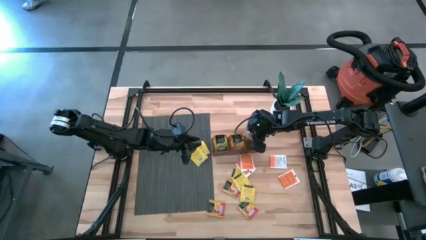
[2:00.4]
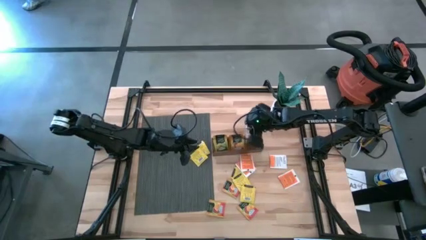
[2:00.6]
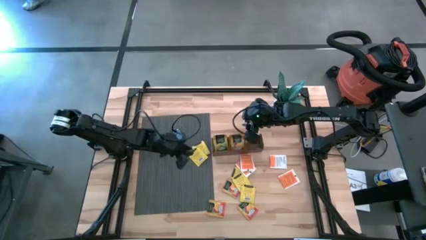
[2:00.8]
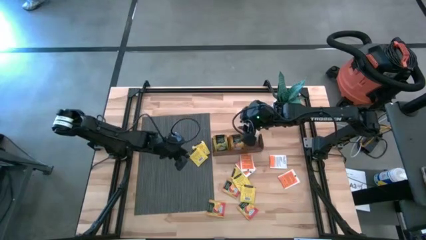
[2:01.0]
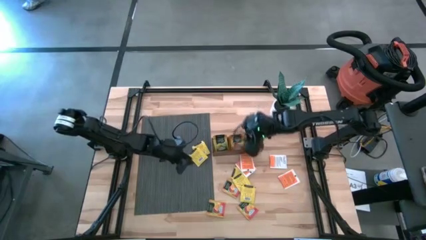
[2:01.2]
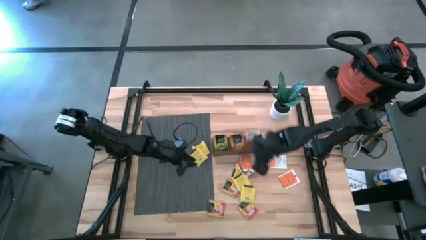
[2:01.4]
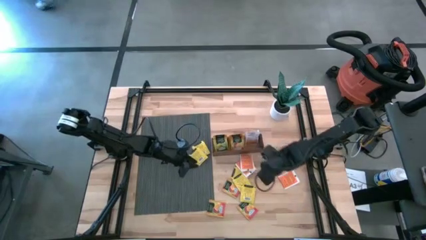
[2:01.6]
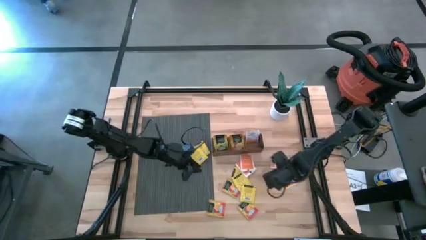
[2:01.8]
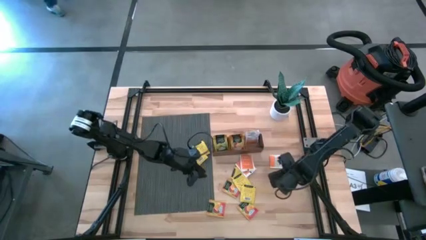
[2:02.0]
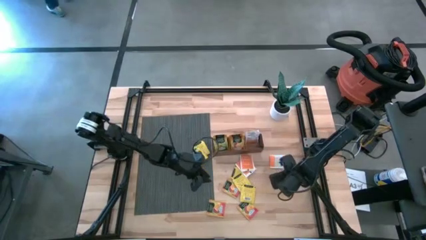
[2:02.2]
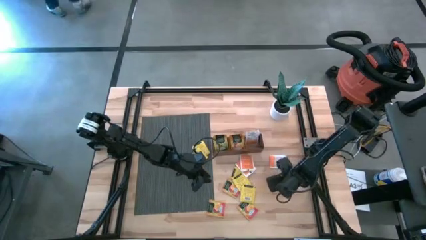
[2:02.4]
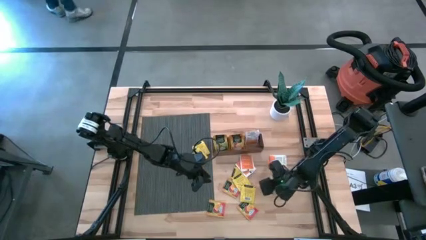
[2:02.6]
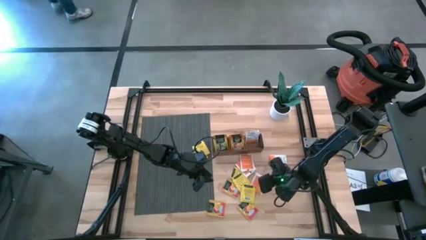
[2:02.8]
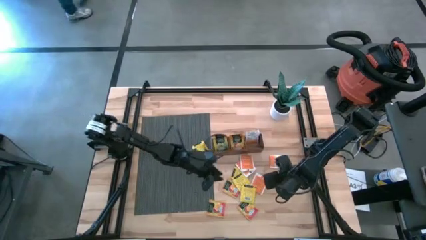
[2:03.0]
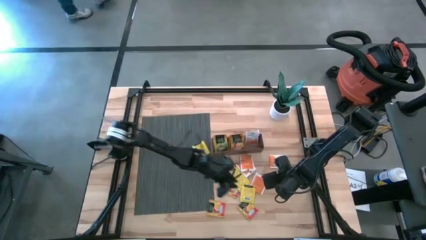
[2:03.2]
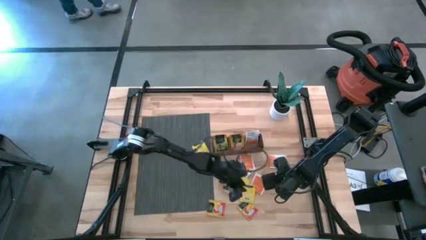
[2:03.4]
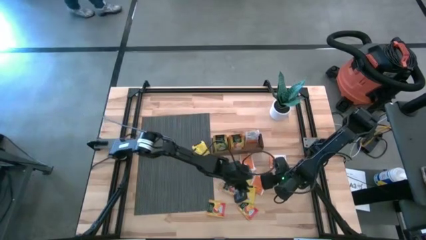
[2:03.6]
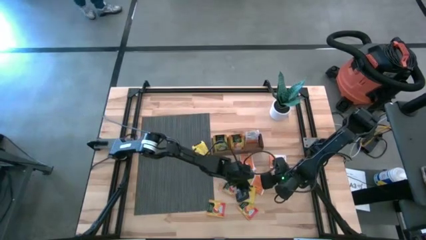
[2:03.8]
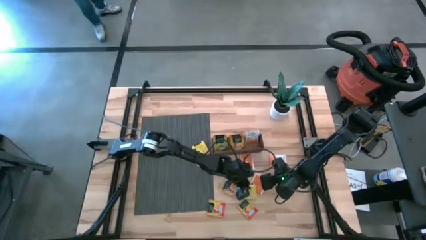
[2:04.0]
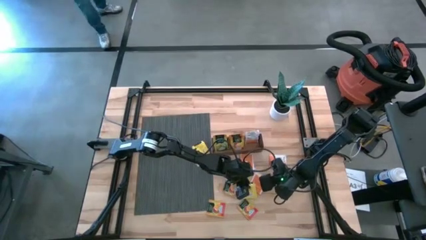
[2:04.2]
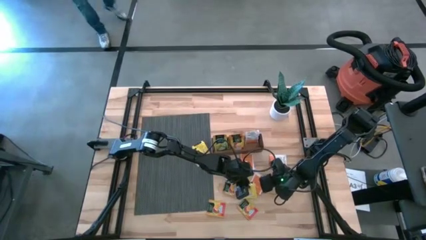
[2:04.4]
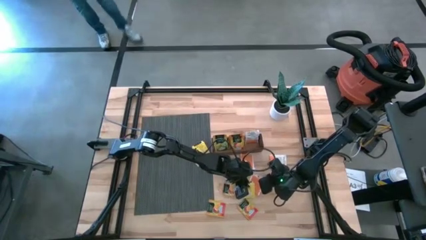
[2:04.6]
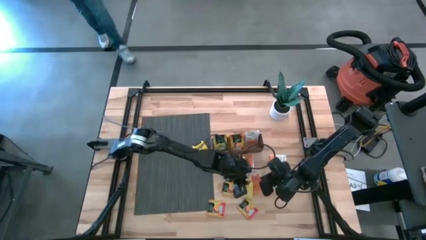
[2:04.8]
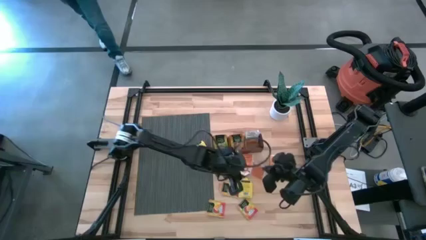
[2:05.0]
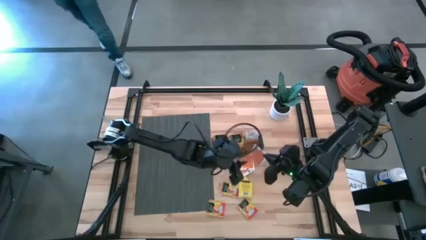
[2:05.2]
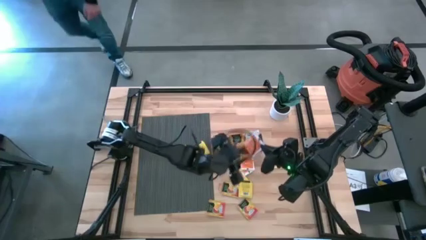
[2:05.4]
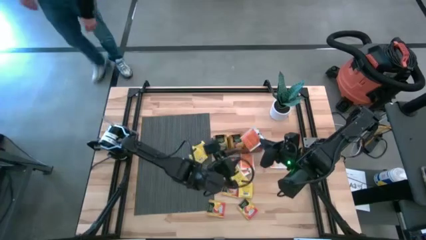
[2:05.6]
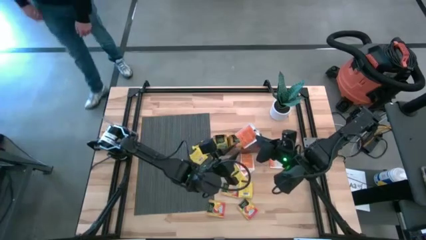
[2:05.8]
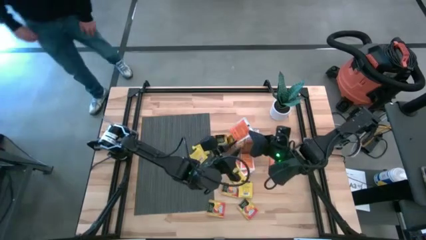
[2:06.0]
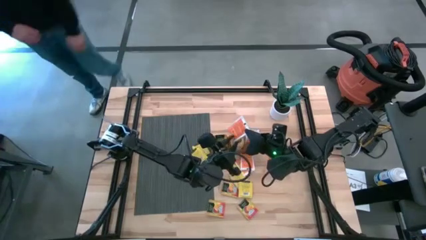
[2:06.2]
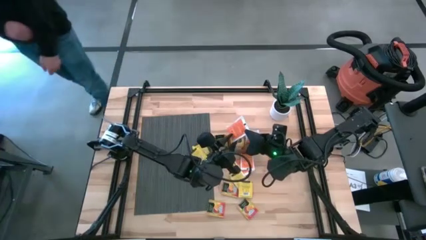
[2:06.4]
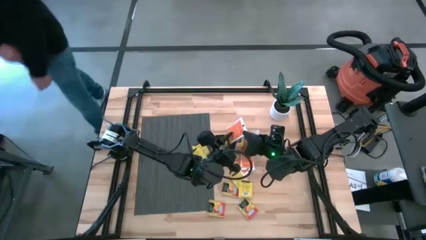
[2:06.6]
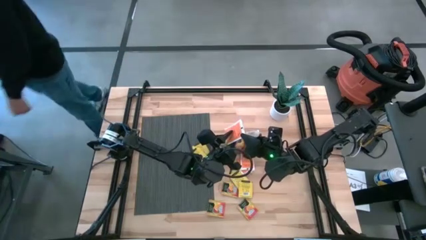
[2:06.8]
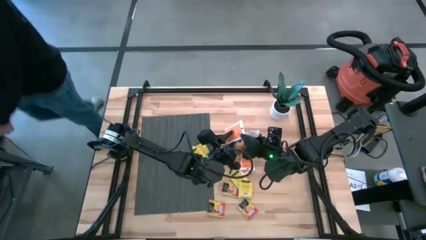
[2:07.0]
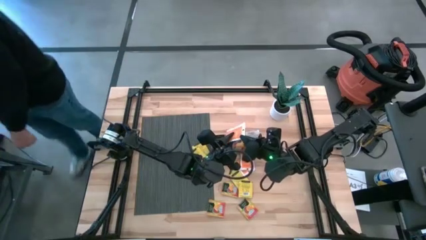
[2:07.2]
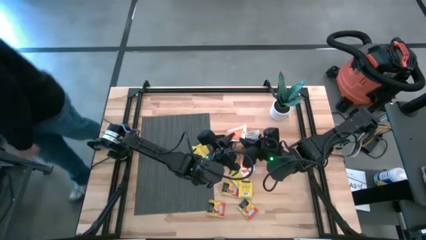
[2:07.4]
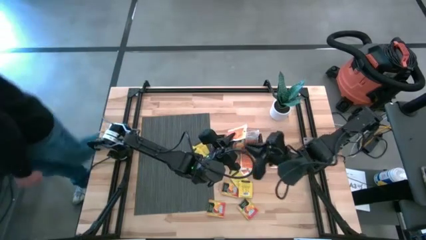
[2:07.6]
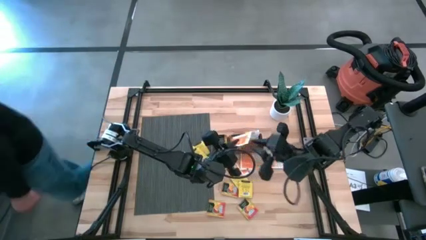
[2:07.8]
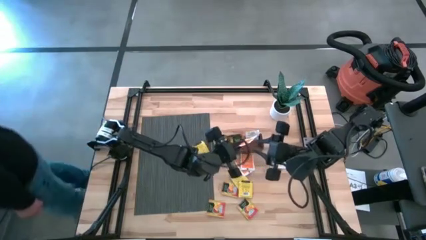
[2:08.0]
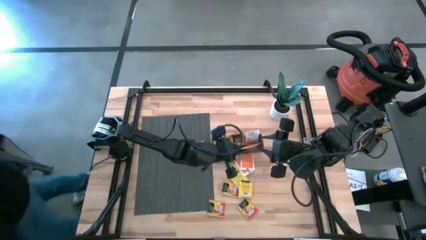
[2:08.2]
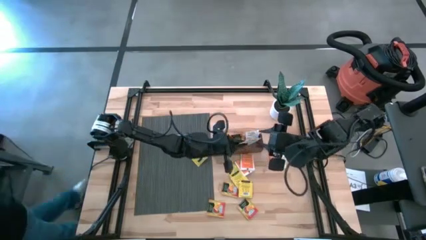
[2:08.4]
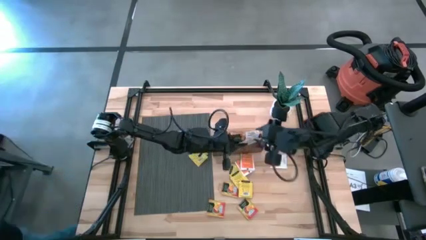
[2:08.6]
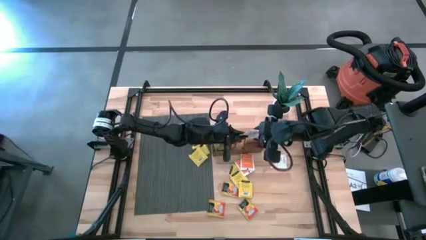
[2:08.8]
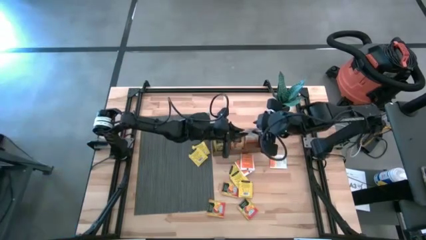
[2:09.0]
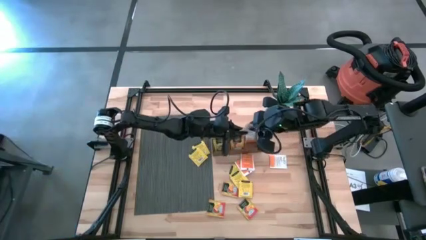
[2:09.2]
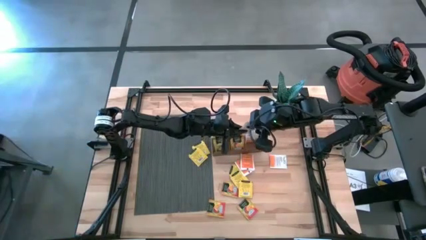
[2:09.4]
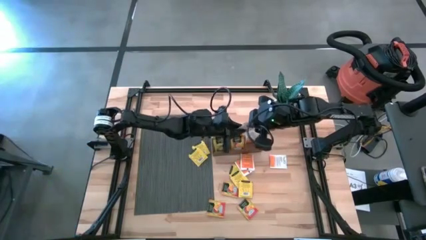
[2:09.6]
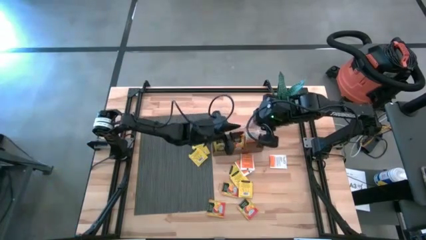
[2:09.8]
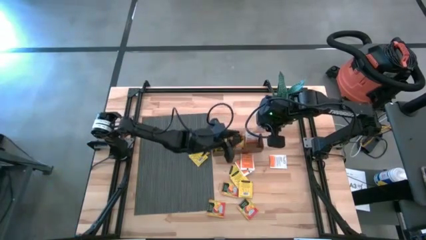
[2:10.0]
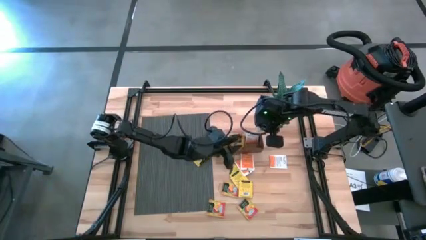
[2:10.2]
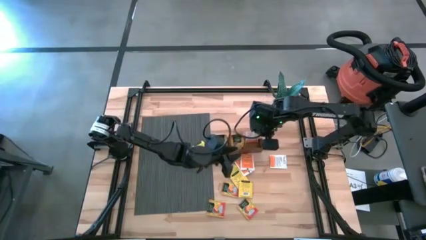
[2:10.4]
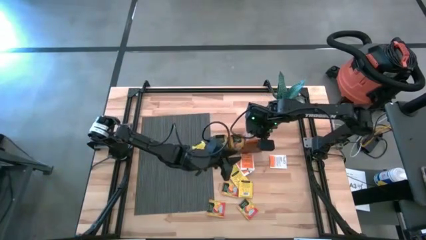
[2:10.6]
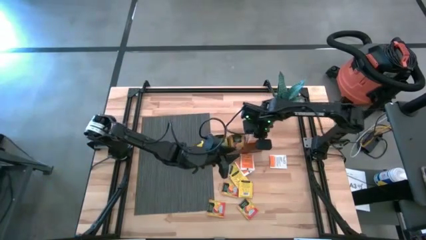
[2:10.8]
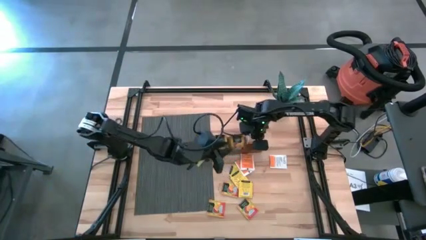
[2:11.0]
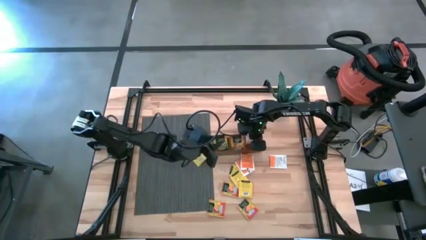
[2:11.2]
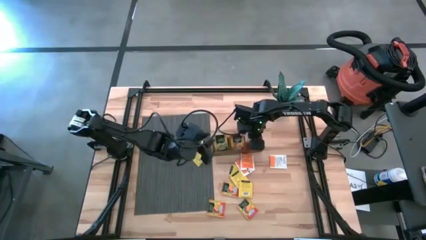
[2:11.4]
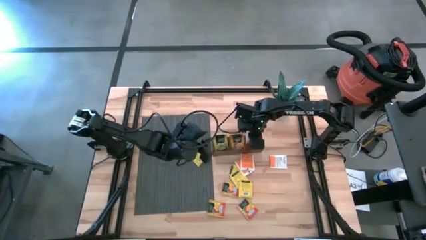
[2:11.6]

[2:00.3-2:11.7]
Task: Pick & Place Tea
Put the white tea bag into the right section of the wooden organizer

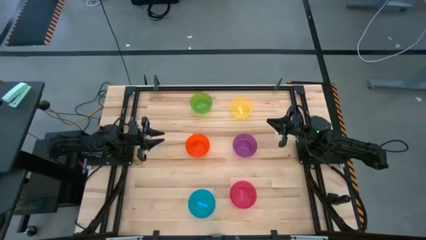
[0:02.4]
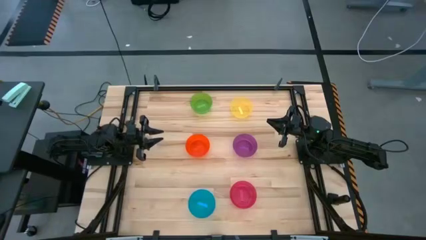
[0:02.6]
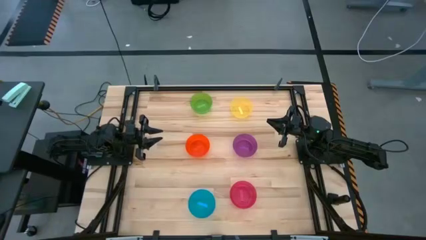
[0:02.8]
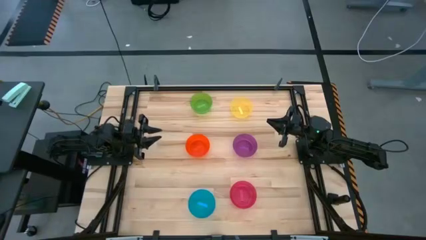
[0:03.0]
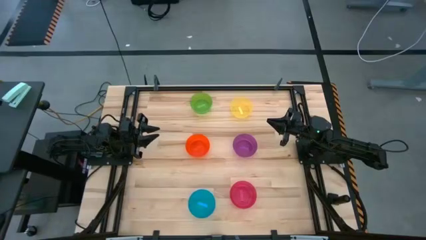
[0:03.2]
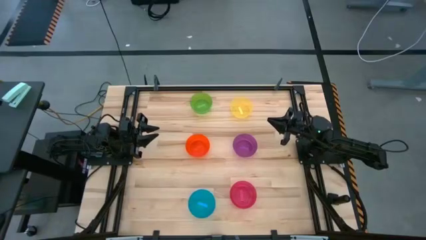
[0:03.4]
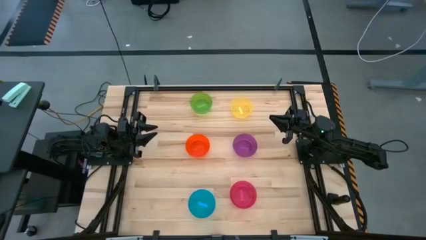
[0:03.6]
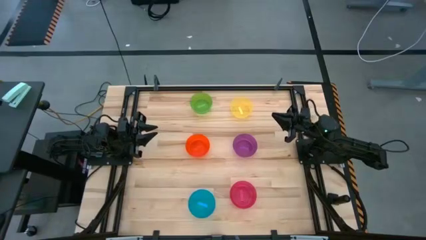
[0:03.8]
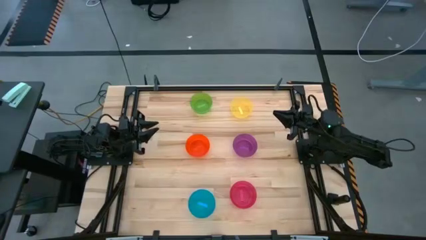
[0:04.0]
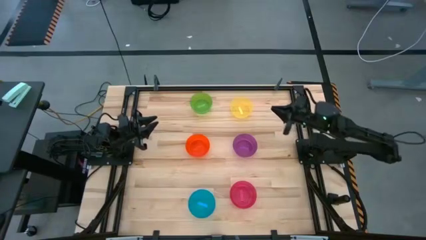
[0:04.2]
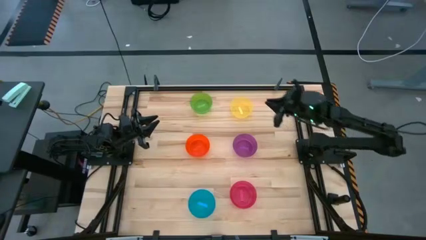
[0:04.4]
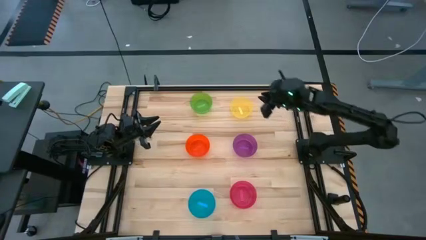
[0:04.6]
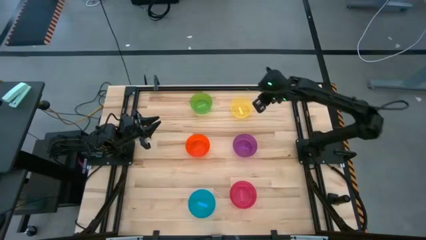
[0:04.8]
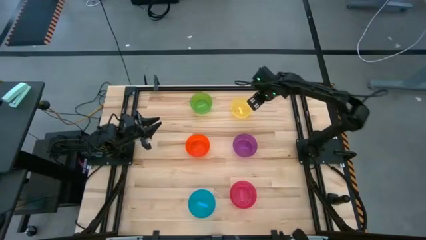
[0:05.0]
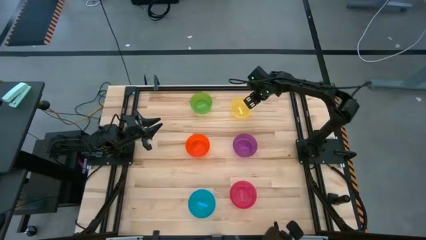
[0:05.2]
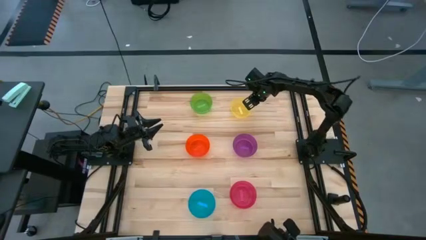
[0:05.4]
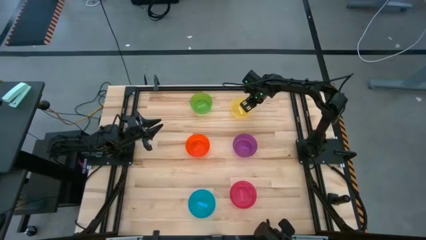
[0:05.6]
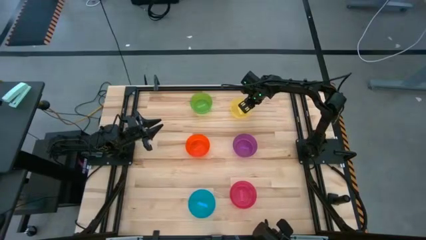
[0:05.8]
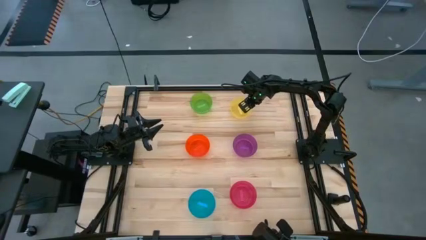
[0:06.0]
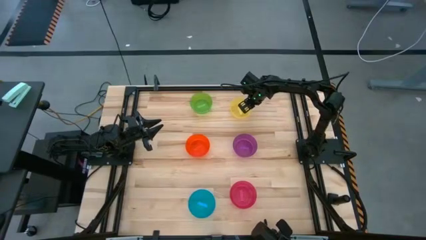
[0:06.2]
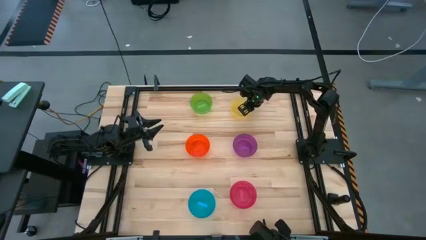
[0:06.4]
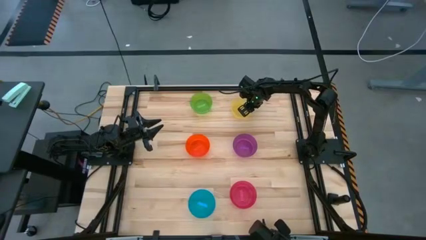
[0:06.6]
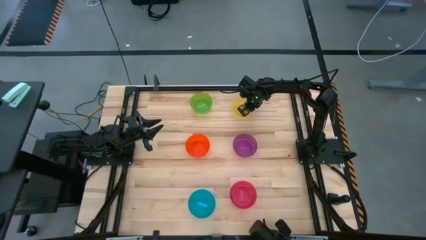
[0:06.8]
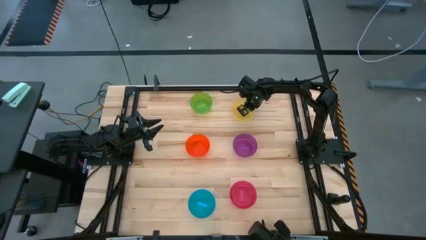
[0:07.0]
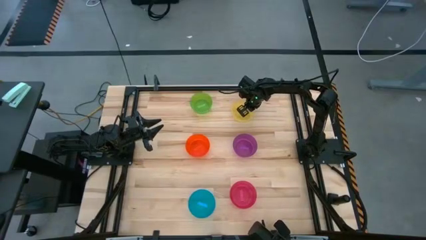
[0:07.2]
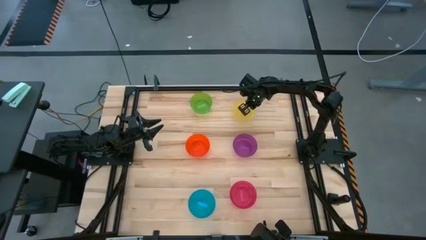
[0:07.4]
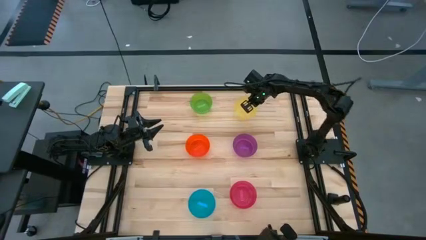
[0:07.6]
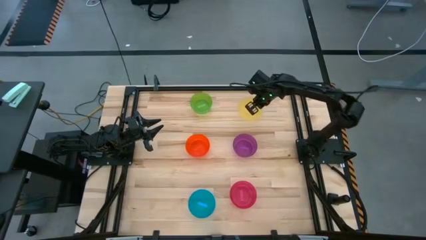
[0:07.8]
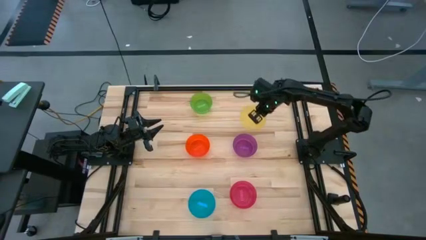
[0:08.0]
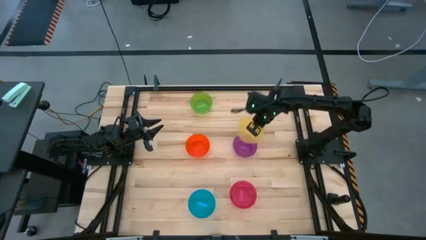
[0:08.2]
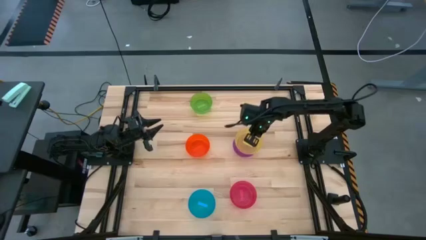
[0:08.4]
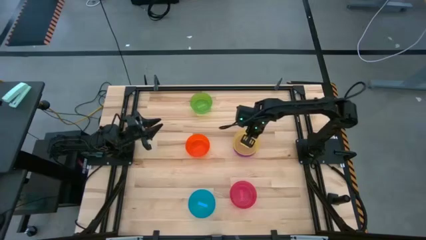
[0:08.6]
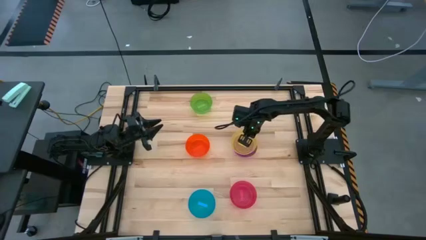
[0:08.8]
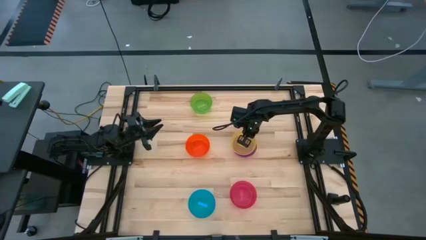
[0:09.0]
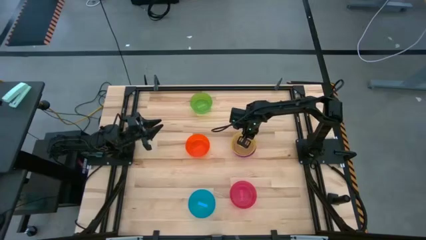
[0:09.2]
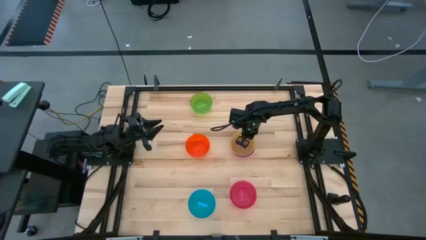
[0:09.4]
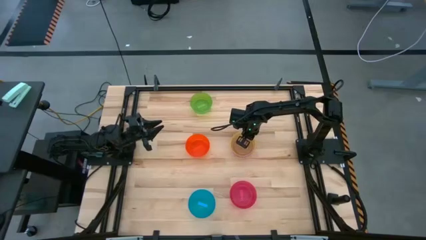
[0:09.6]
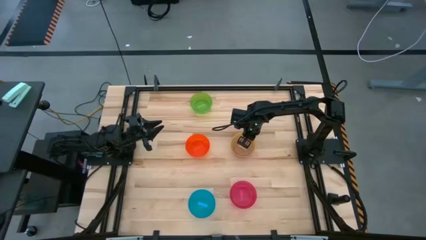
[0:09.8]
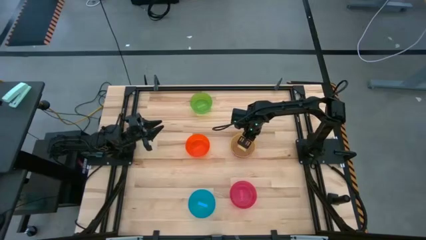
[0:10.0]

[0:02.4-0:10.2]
Task: Nest bowls inside each other
Stack the yellow bowl on the purple bowl
